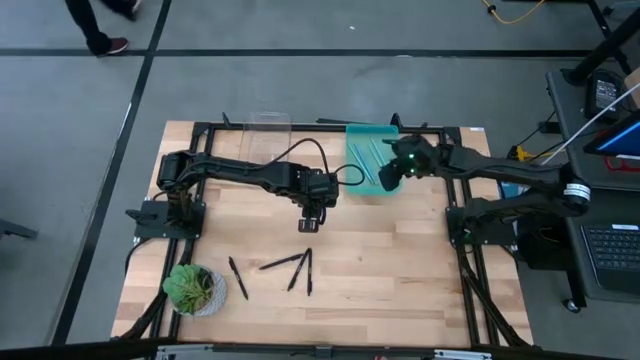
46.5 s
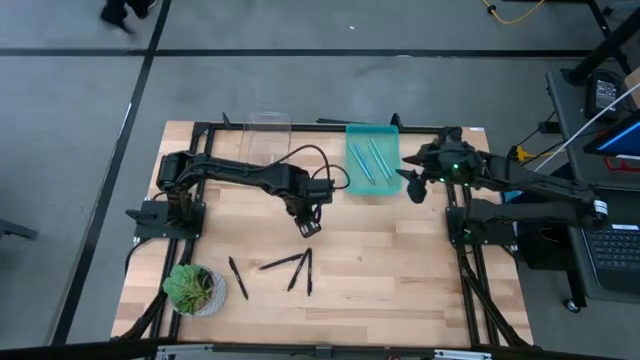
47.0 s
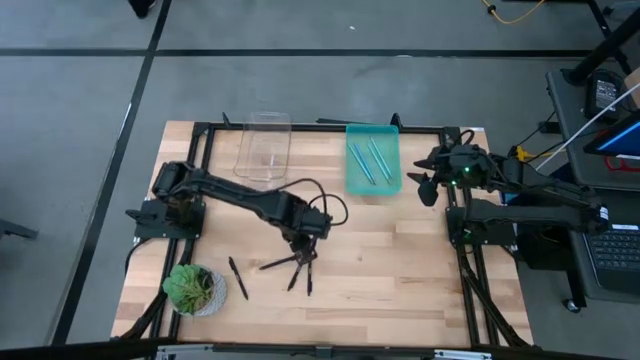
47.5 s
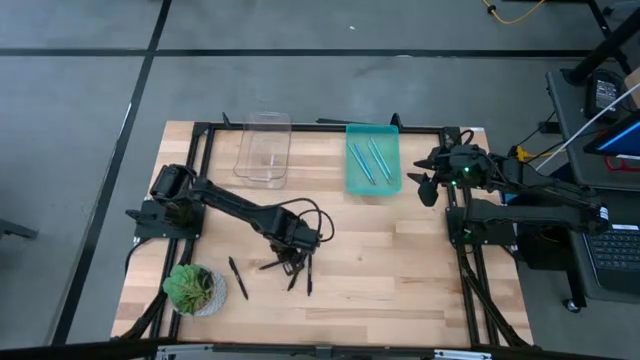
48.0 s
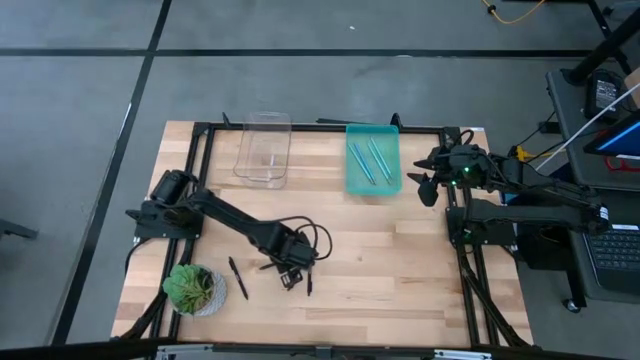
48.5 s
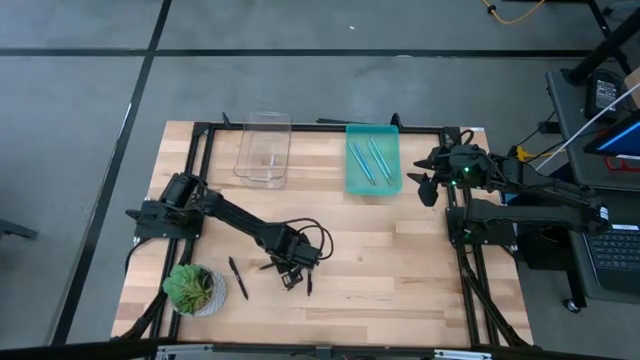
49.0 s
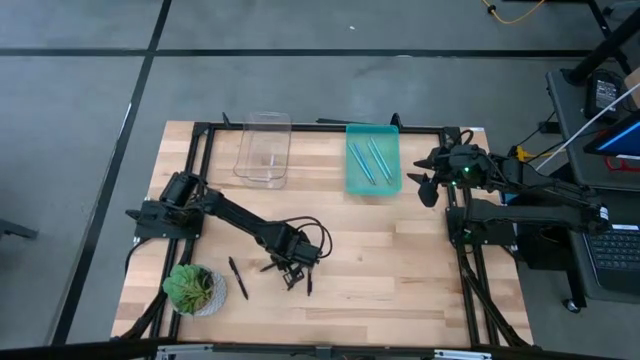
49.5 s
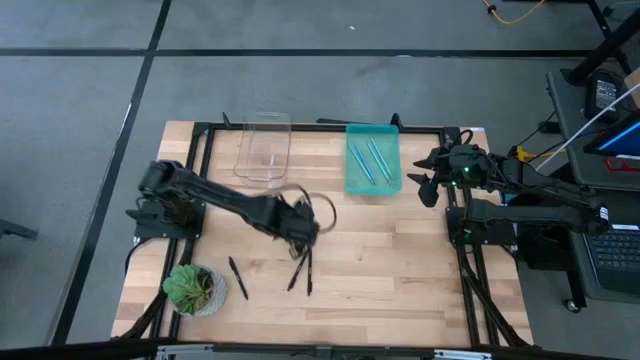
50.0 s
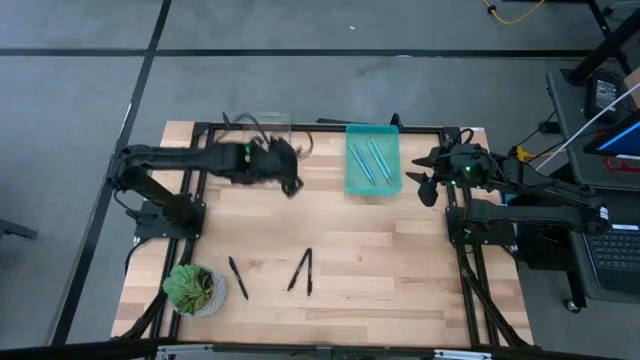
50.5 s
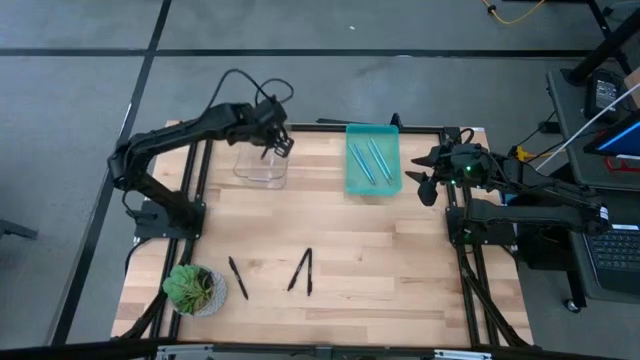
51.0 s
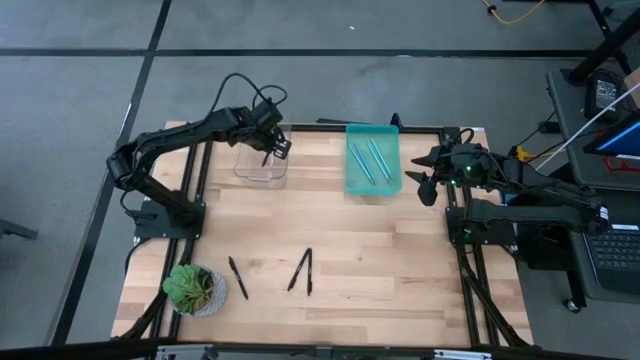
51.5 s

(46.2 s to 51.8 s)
Task: Sort pens & pencils
Put the black pen into the transparent bin

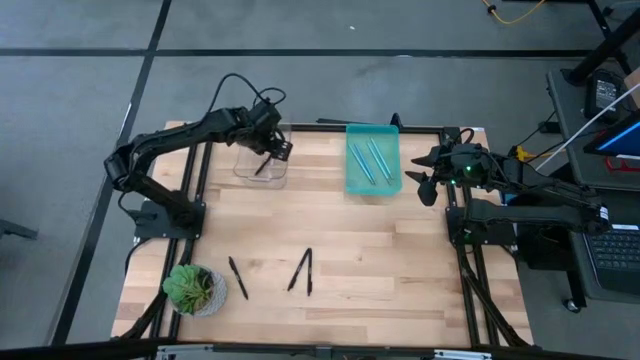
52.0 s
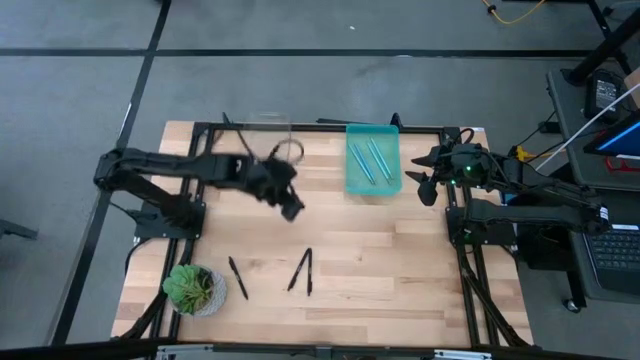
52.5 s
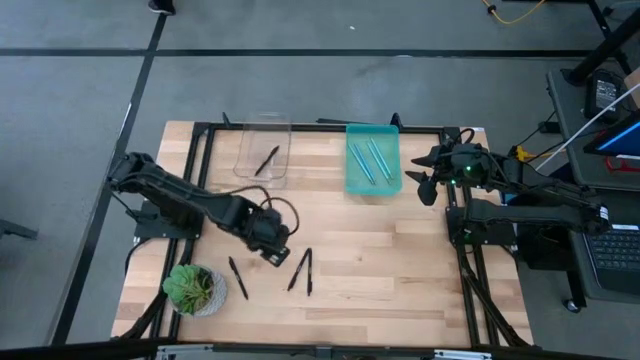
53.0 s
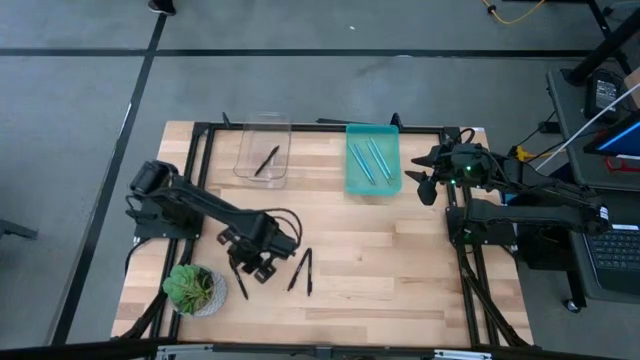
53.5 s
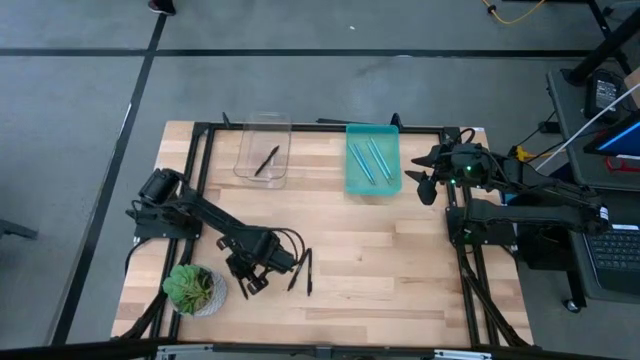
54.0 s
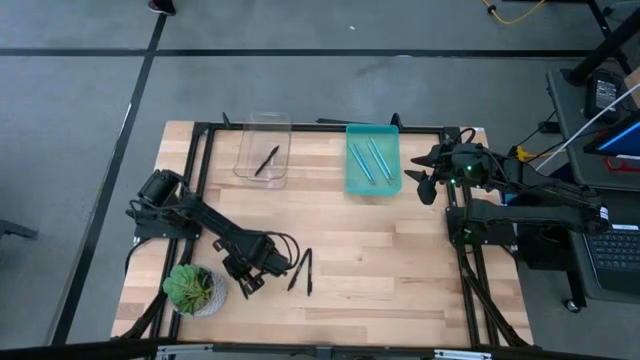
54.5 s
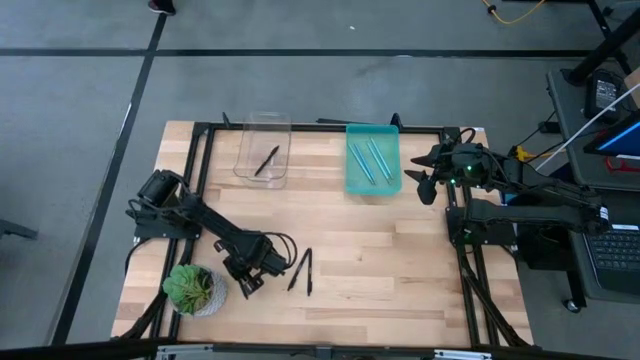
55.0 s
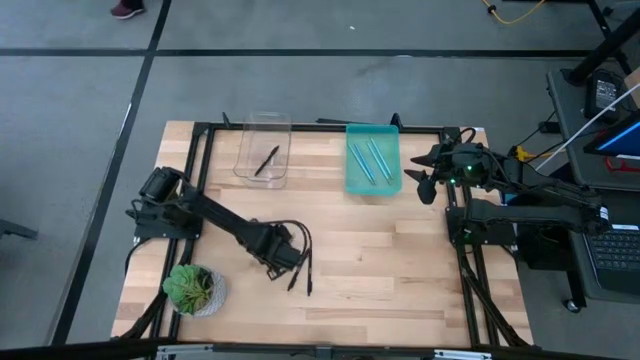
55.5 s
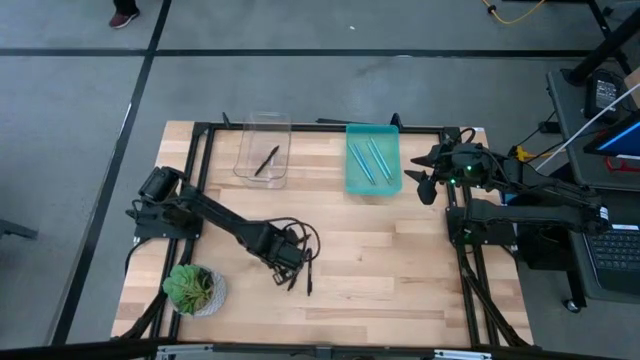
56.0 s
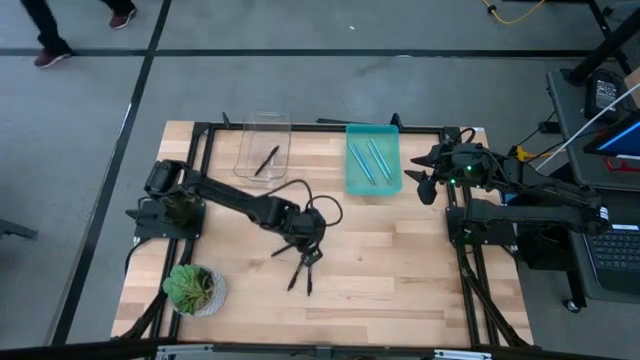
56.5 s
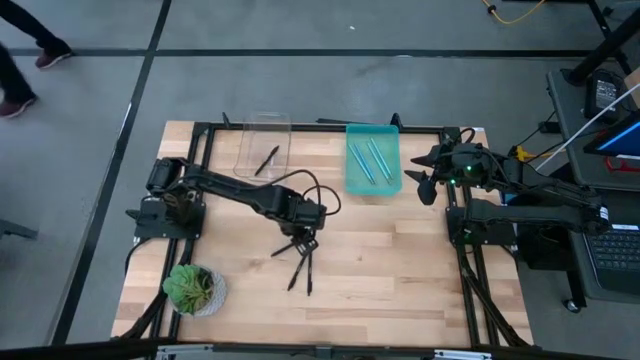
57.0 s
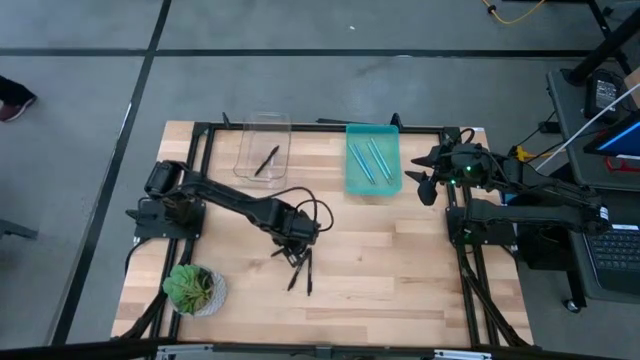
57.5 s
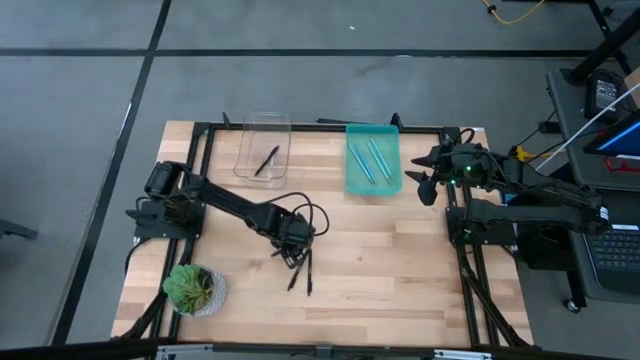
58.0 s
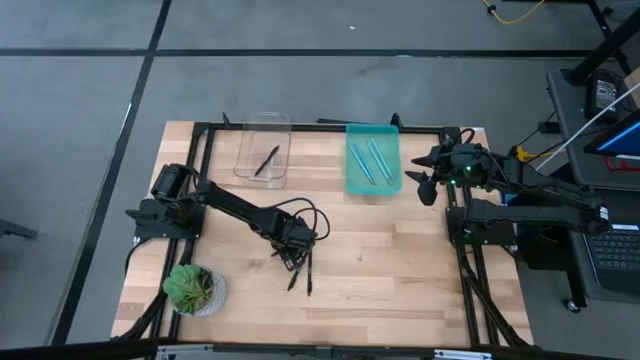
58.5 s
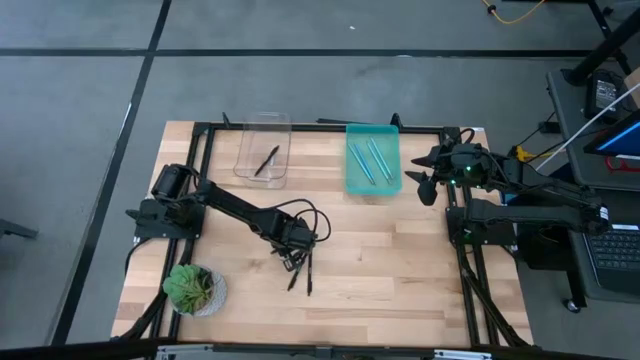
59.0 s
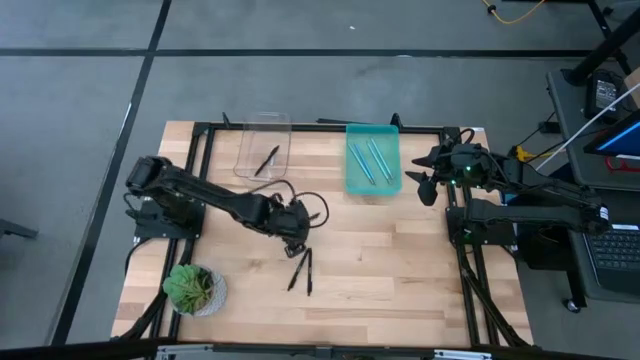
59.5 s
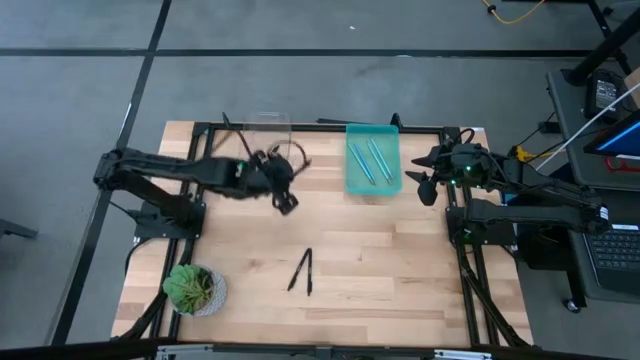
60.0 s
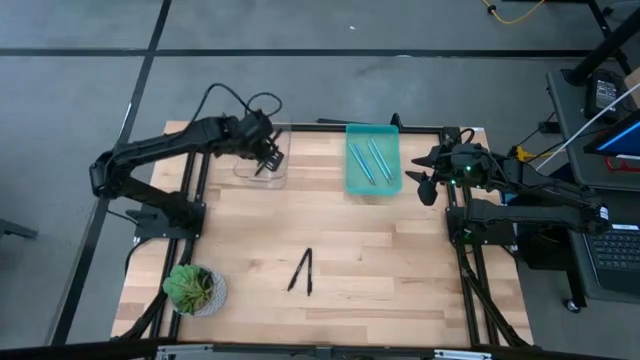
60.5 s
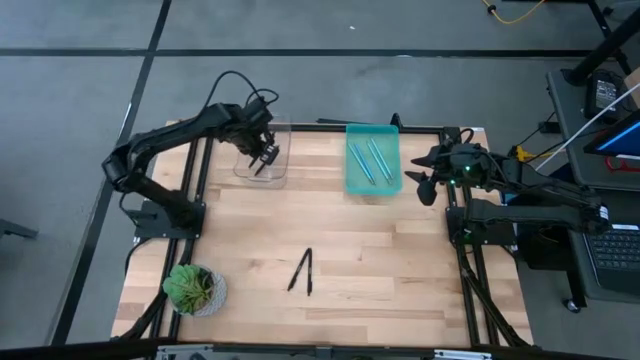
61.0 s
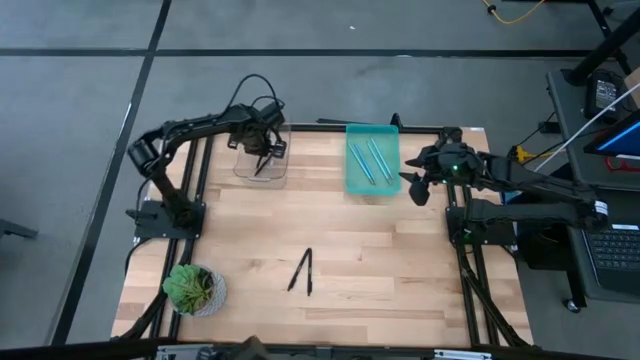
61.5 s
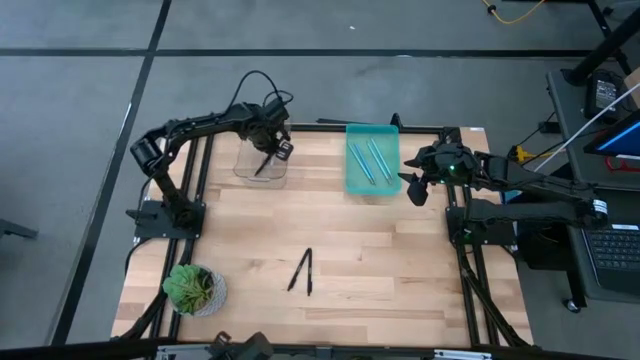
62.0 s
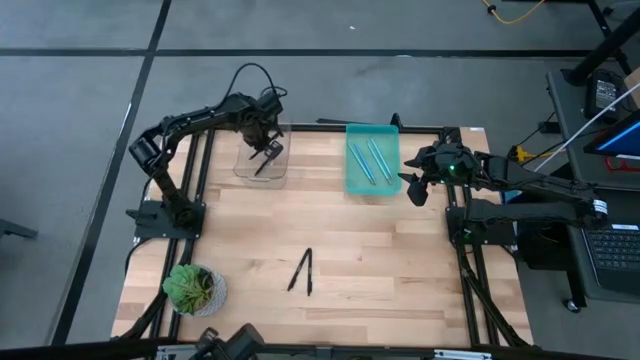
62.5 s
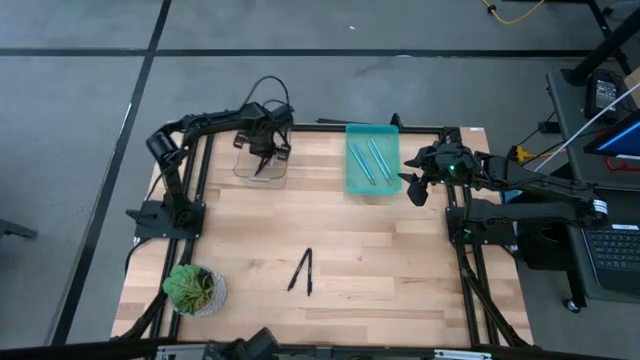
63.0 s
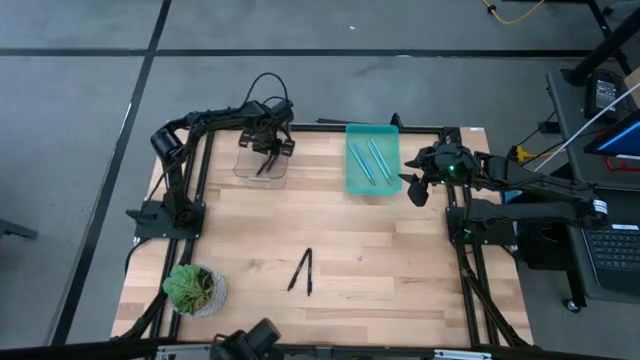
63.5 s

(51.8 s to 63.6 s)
Put the black pen into the transparent bin

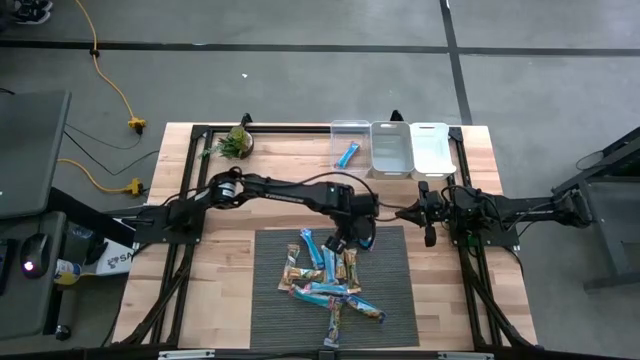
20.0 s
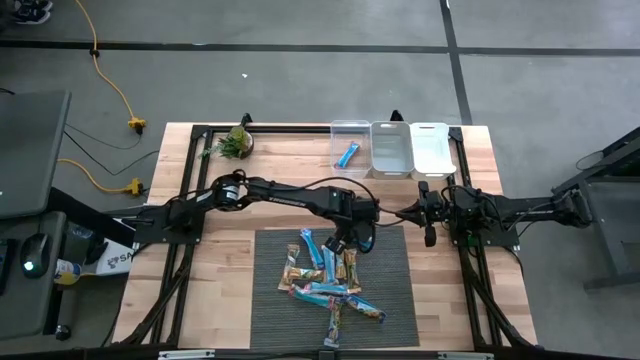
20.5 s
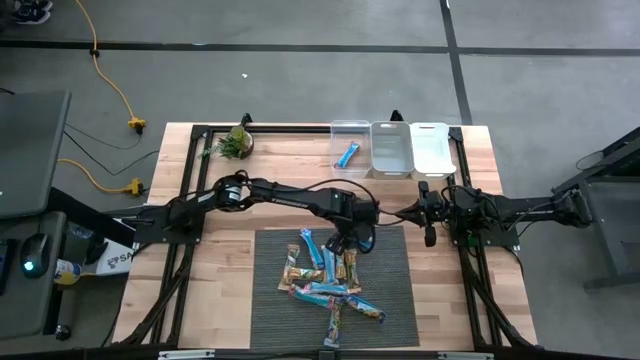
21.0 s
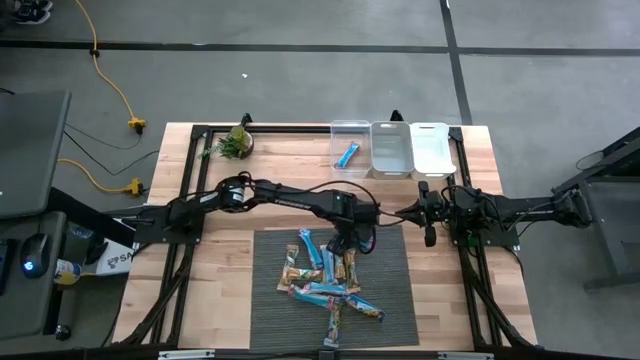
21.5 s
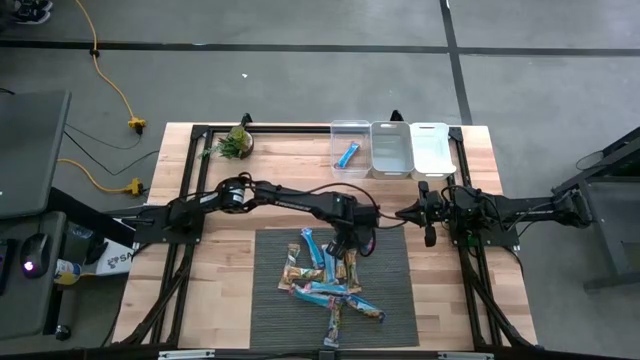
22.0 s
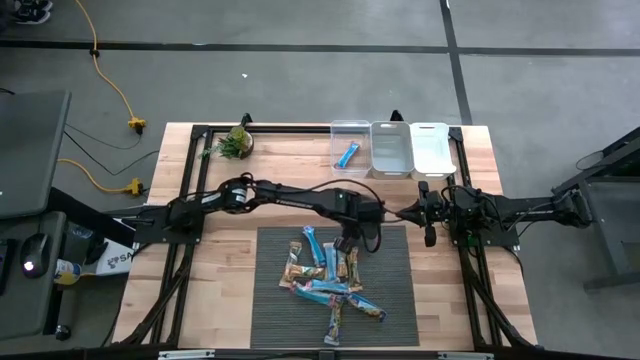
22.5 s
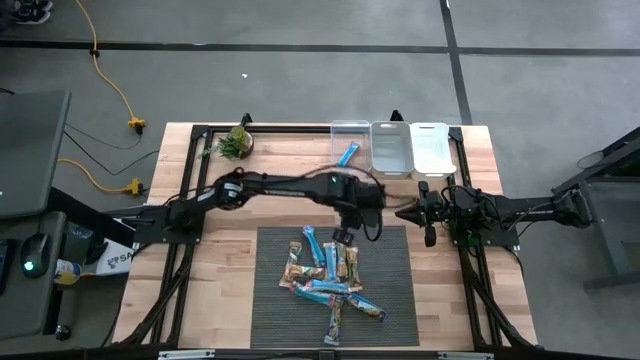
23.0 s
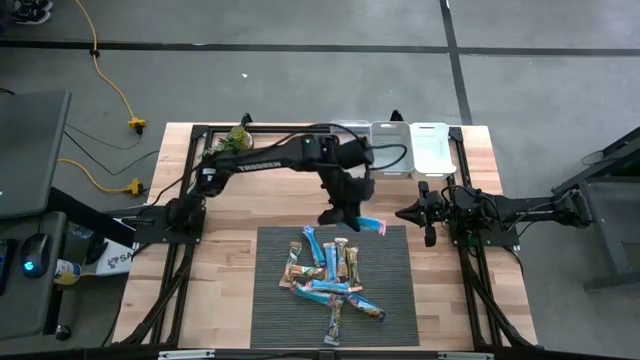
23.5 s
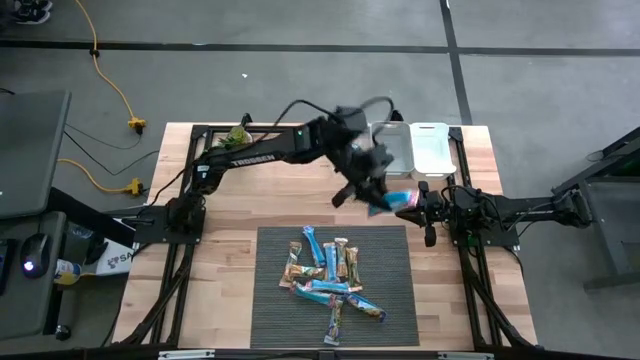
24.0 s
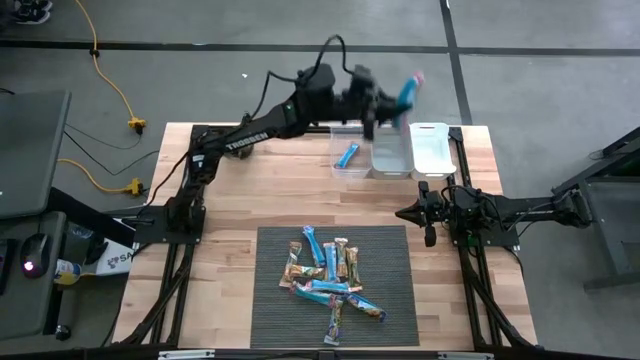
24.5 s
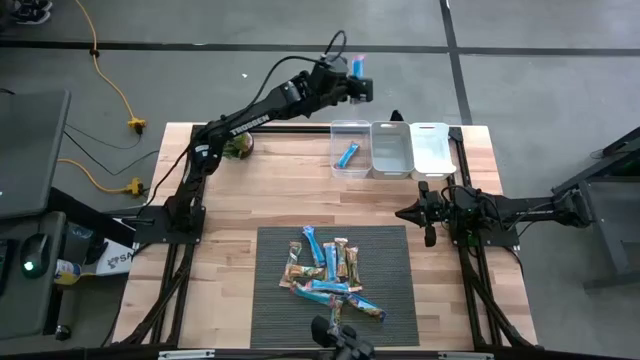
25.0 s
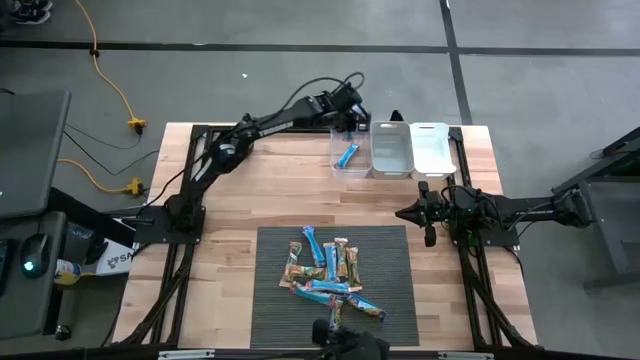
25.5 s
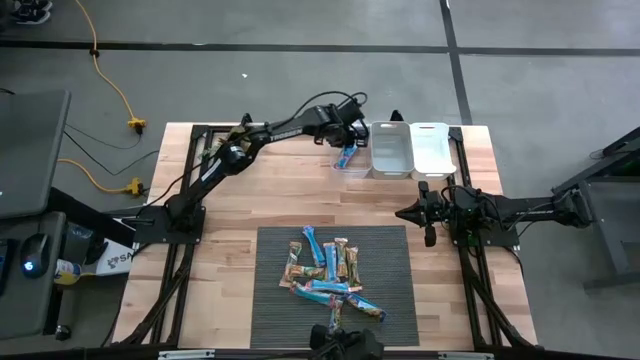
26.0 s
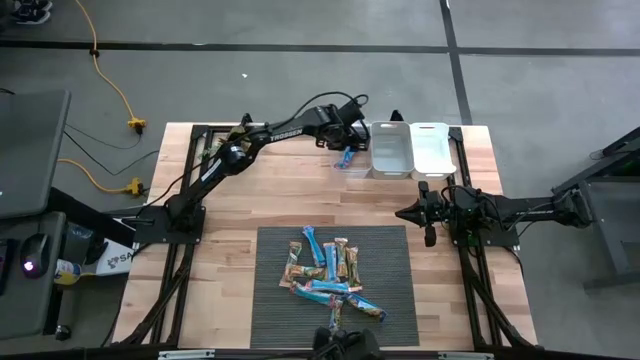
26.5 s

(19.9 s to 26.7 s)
Task: Pick and place Granola Bars by type
Put the red granola bar into the transparent bin
